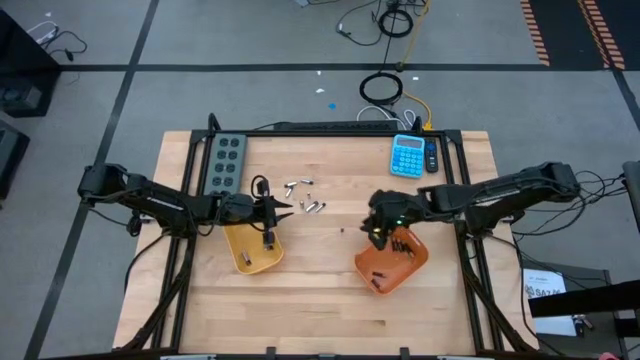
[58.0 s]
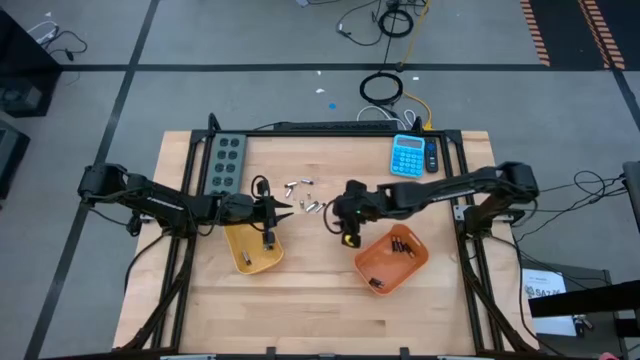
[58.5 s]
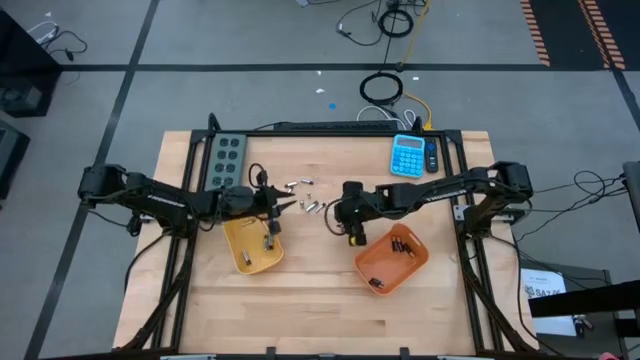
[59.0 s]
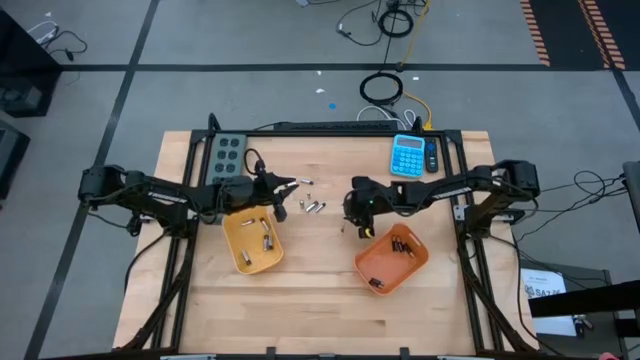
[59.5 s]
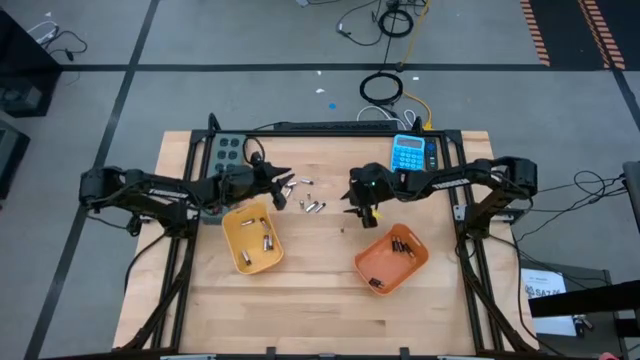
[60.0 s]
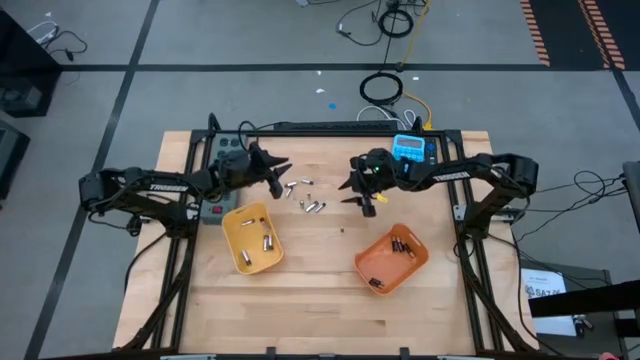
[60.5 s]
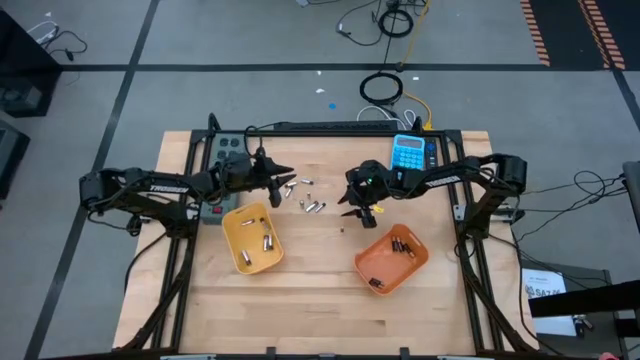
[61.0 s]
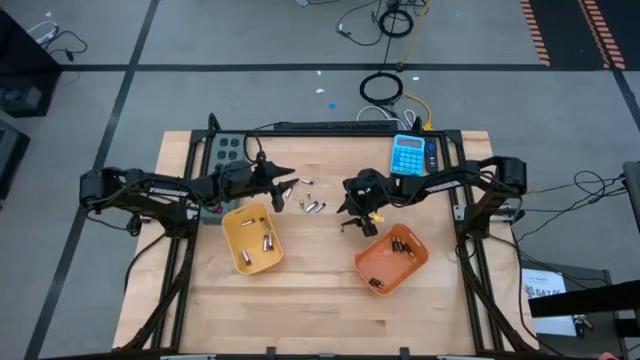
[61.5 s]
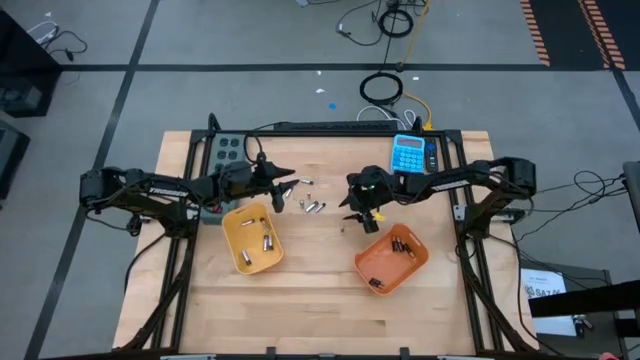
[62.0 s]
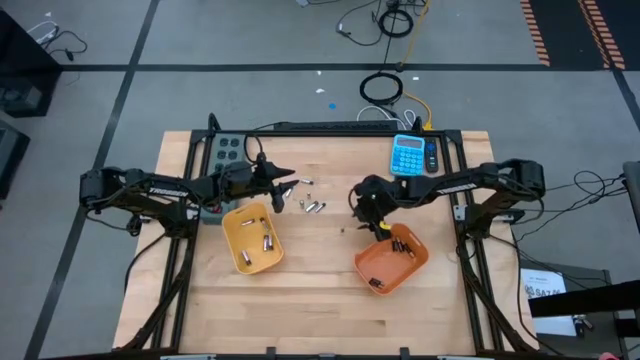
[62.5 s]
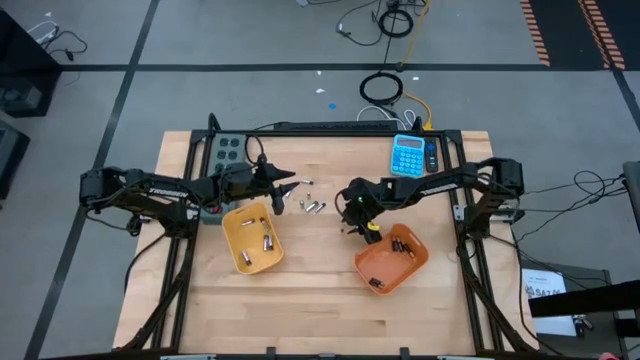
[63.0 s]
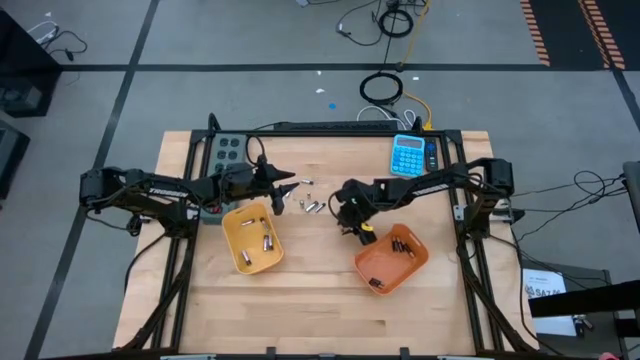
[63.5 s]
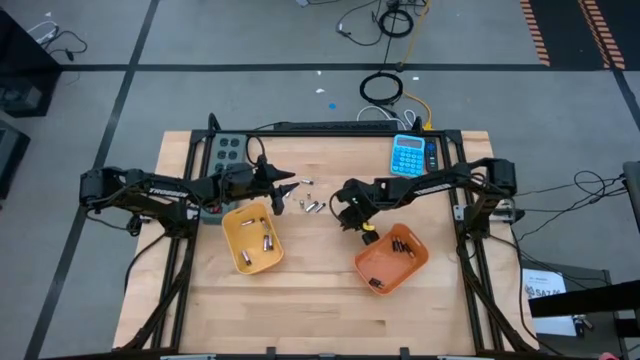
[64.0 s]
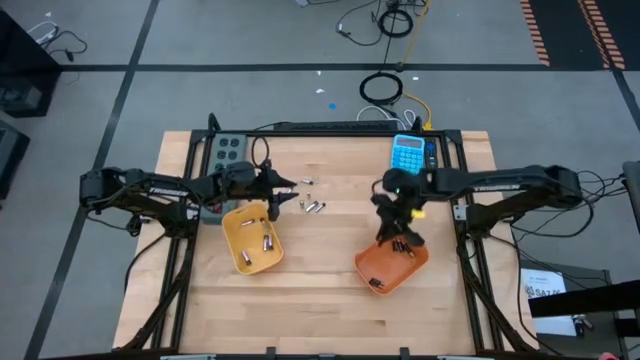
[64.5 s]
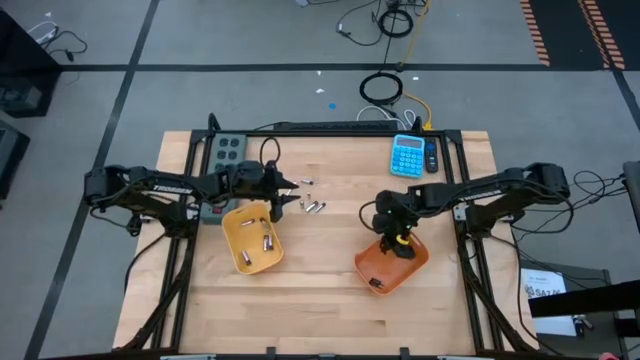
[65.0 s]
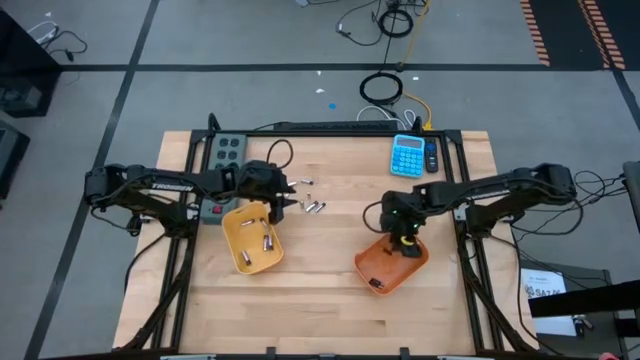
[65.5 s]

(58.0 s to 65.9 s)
Task: Sort batteries
Put the black battery into the orange bin

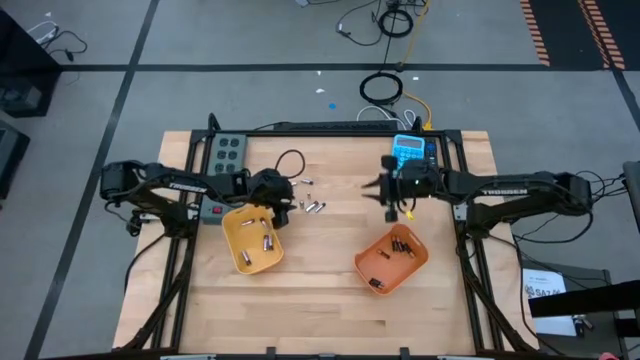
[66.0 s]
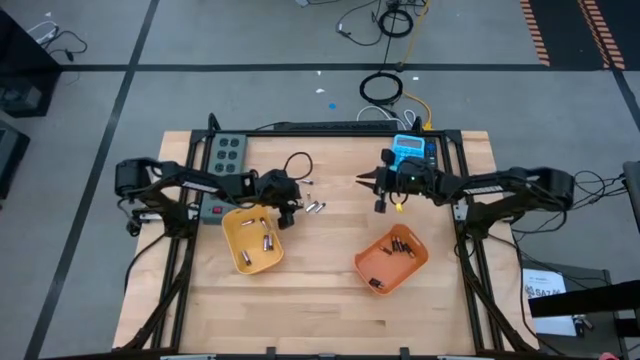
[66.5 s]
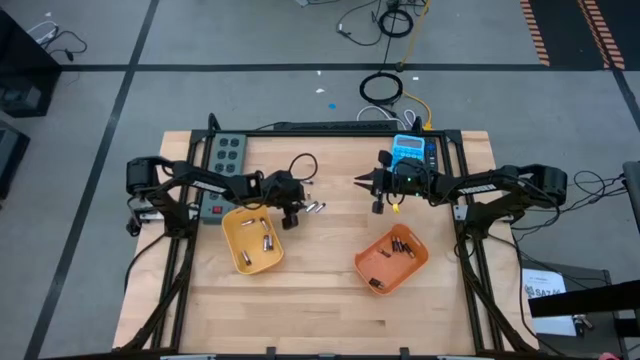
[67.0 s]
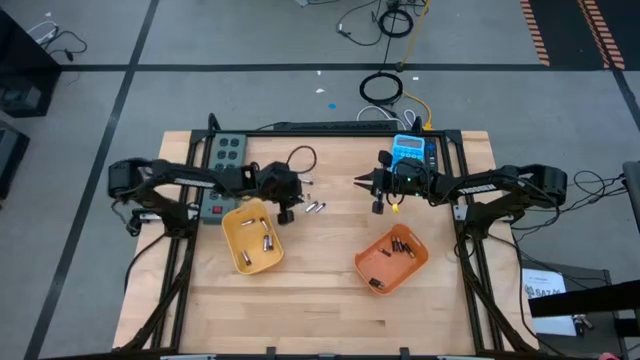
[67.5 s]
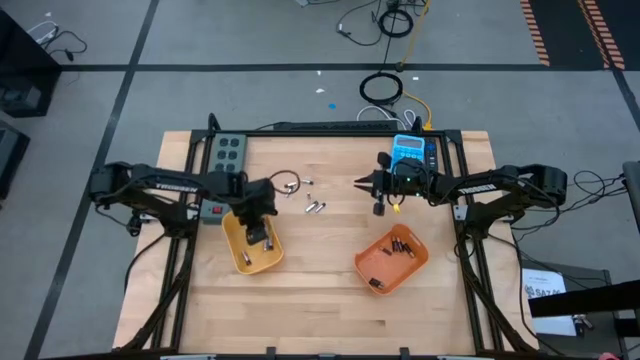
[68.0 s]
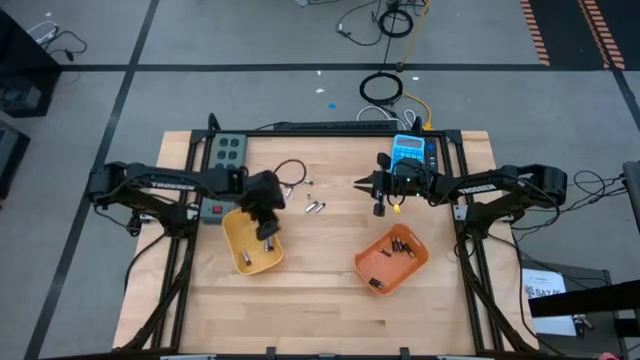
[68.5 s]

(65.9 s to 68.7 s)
Put the silver battery into the yellow bin

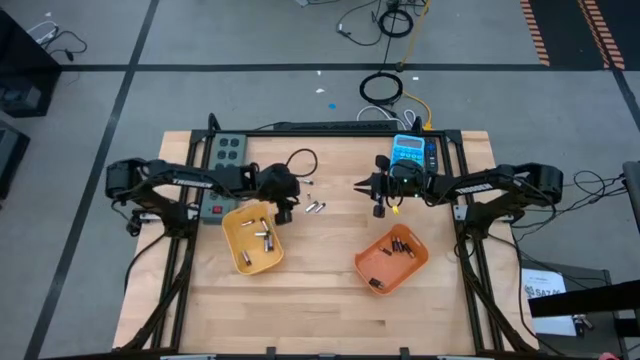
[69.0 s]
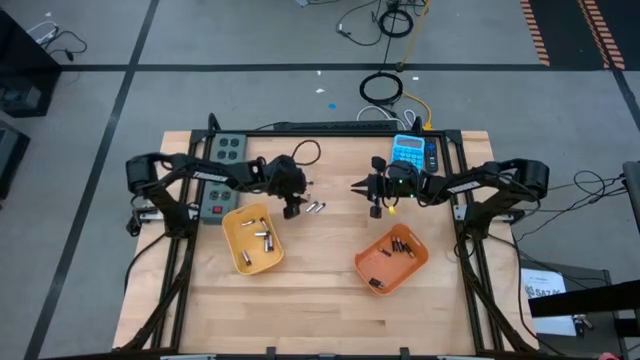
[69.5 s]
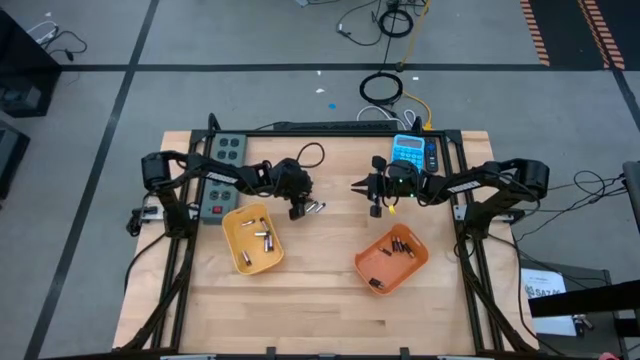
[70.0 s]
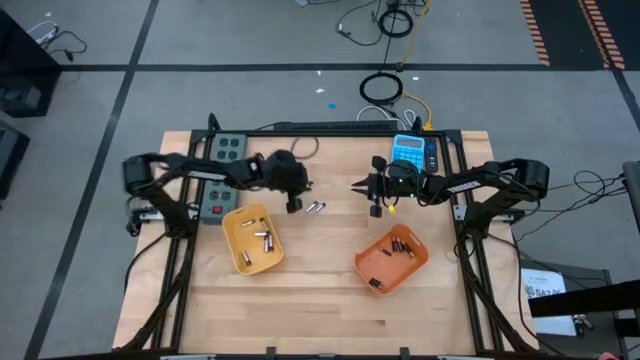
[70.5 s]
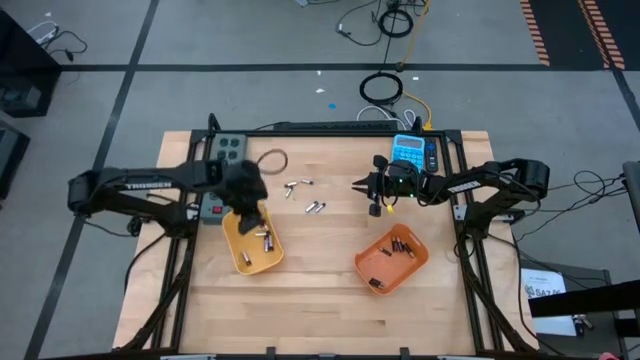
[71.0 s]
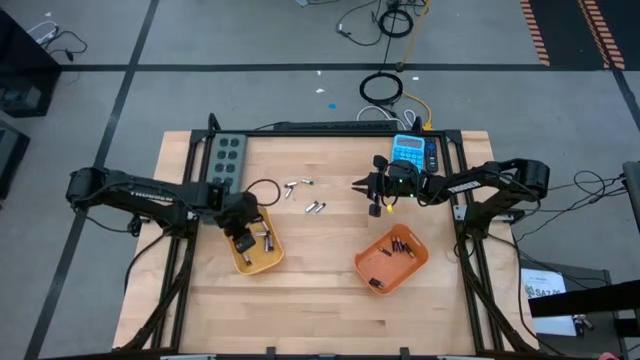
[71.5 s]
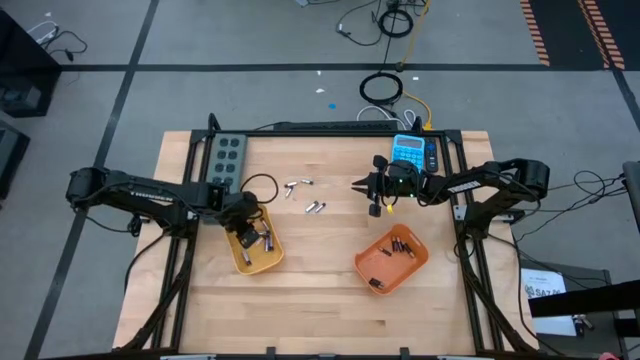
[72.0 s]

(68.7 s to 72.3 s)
Put the silver battery into the yellow bin

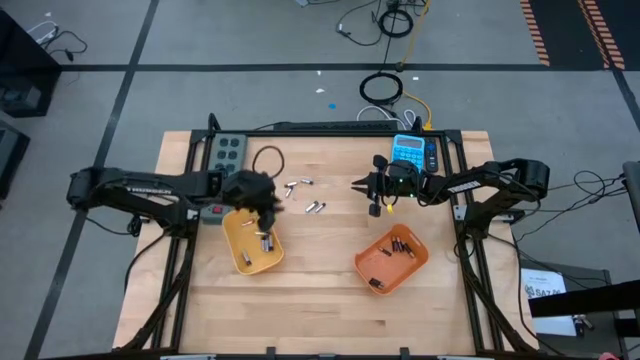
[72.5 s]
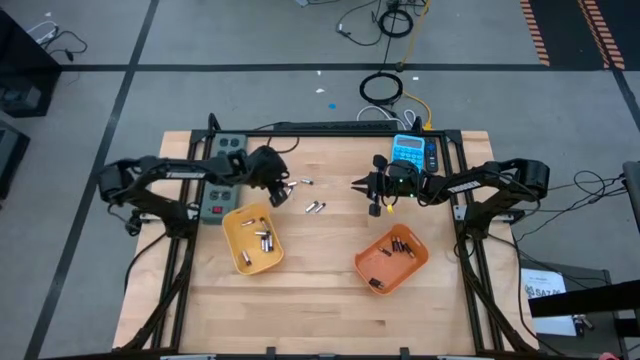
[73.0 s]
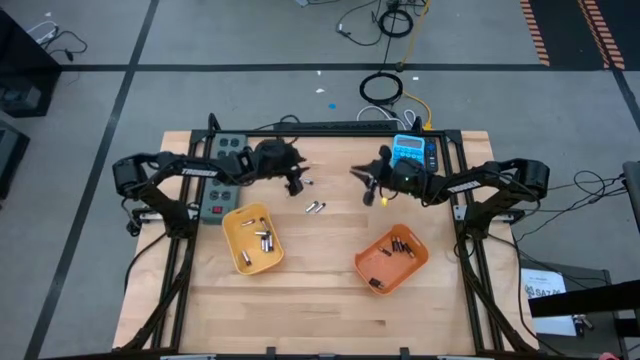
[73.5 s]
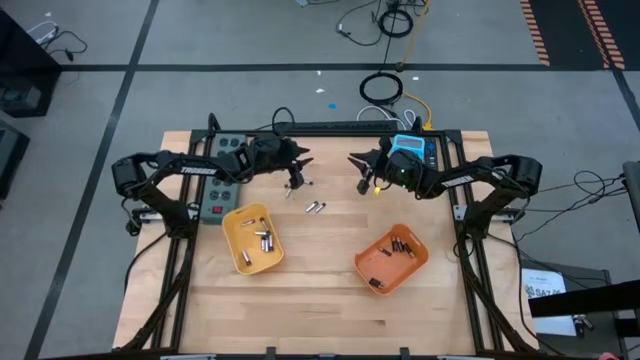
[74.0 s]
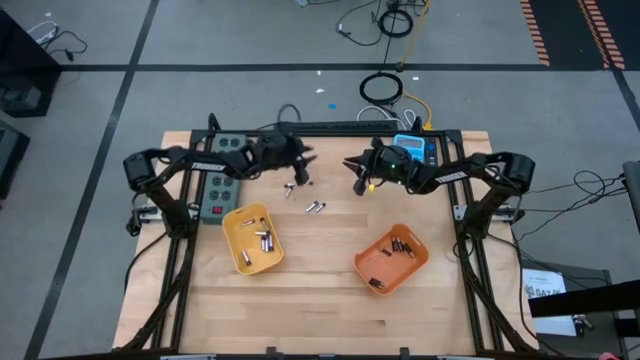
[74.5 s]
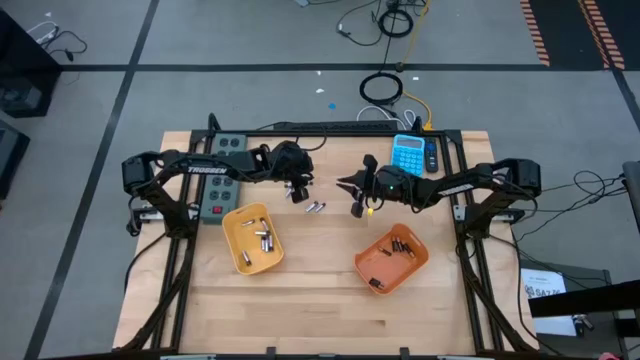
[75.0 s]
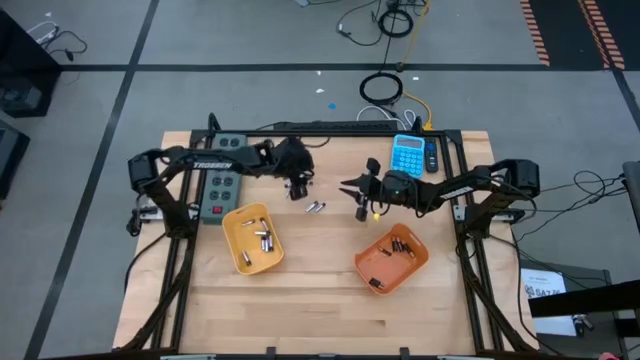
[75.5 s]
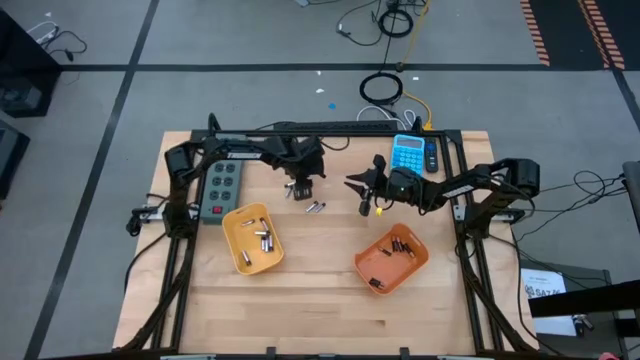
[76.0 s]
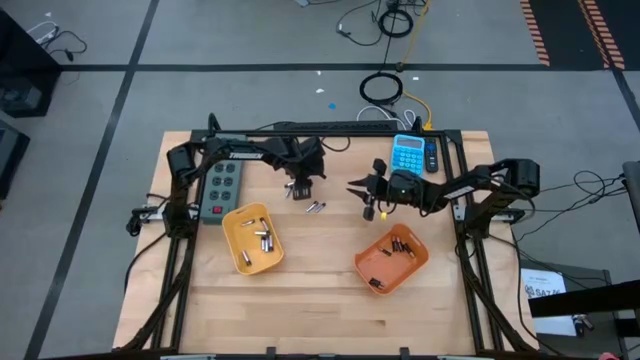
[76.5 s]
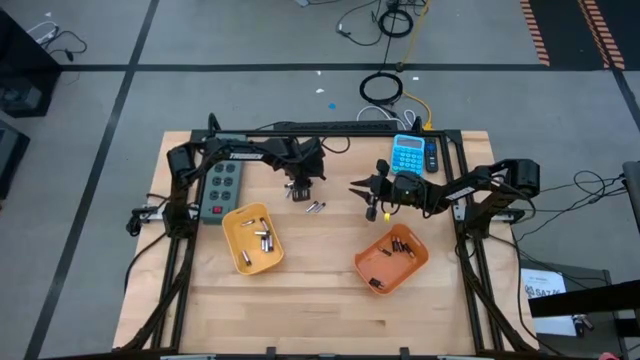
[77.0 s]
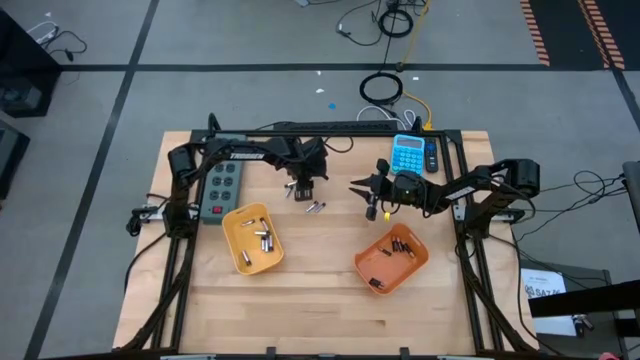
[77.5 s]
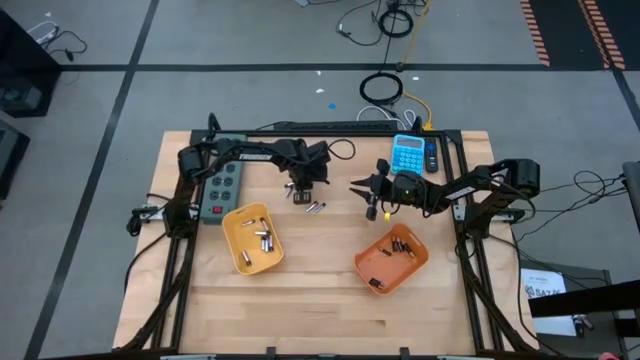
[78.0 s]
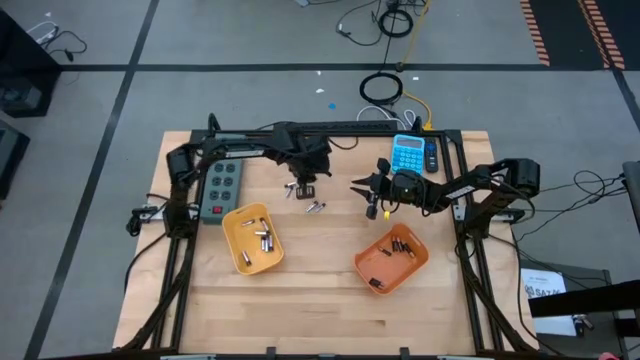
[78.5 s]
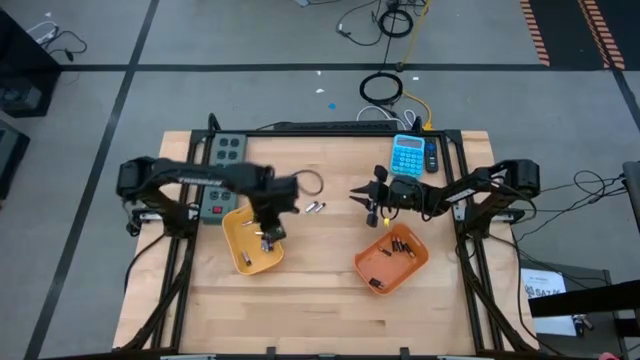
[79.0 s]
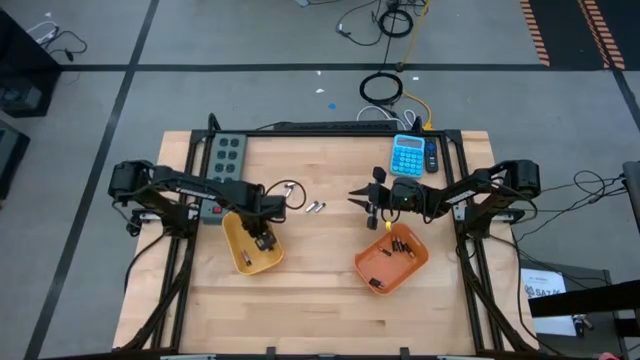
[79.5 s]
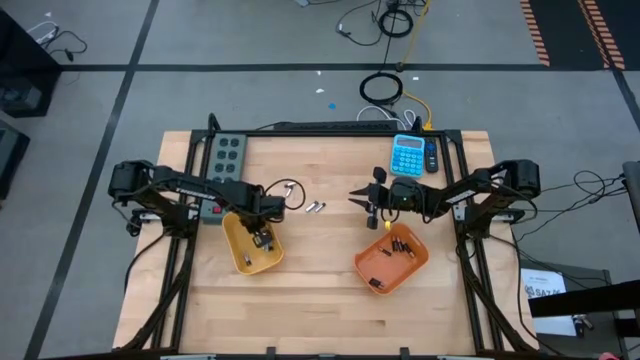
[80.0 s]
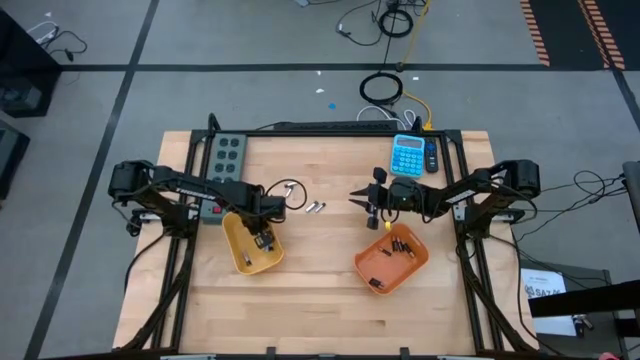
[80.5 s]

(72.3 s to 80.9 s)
Put the silver battery into the yellow bin
